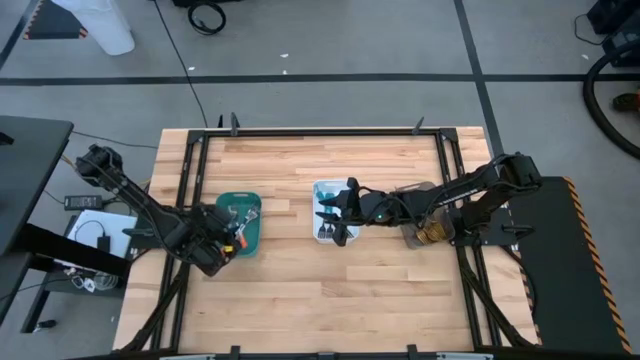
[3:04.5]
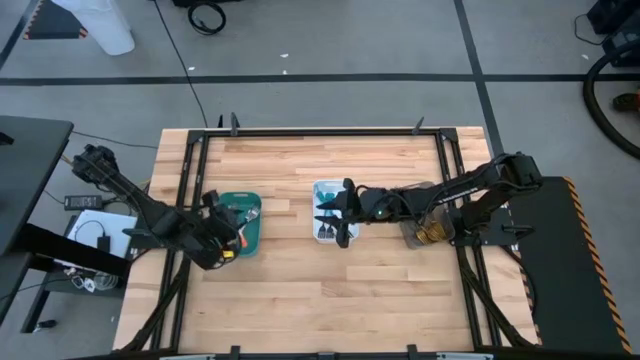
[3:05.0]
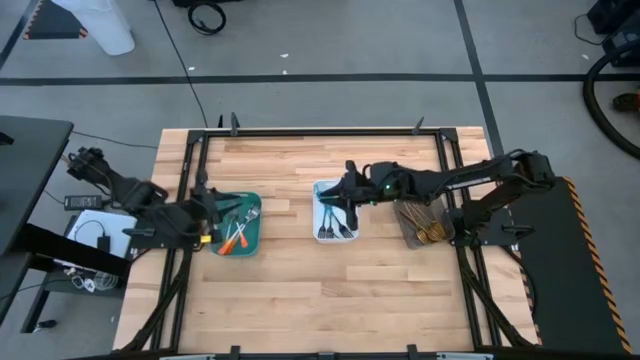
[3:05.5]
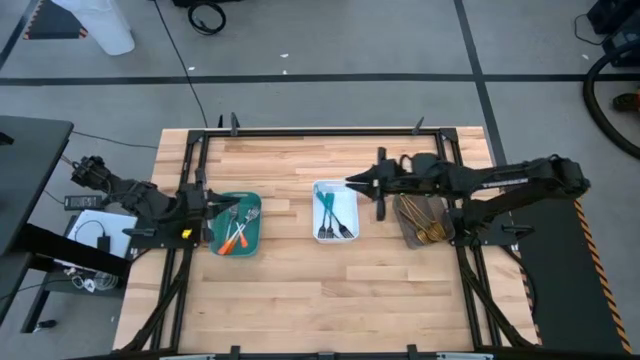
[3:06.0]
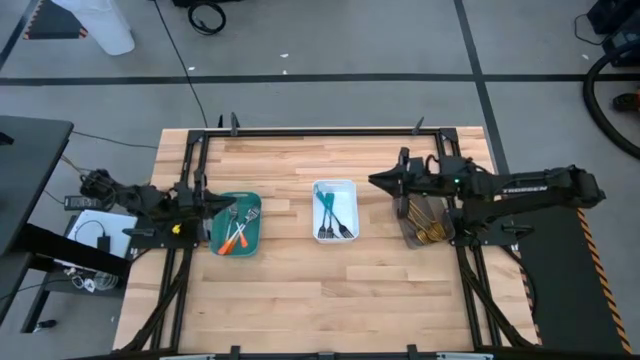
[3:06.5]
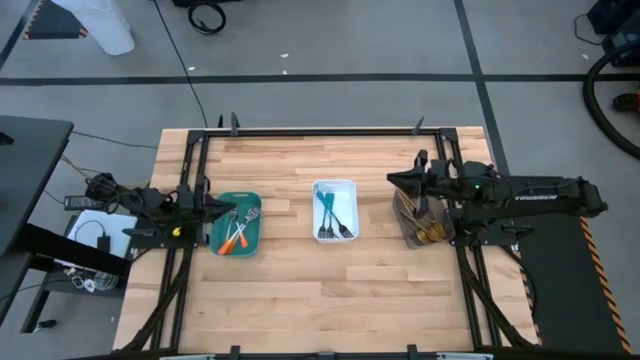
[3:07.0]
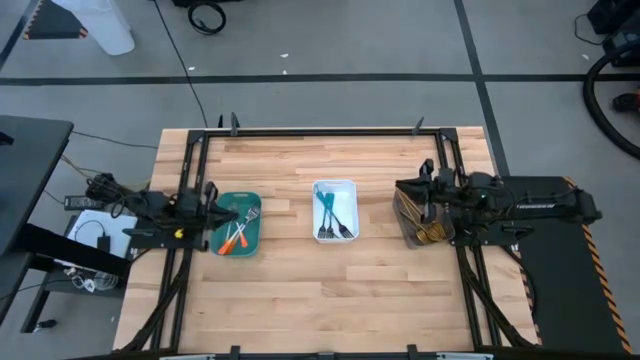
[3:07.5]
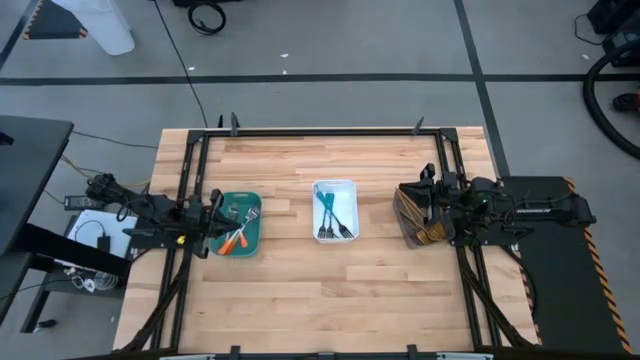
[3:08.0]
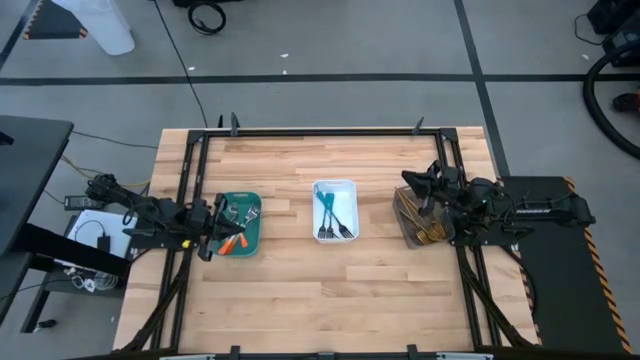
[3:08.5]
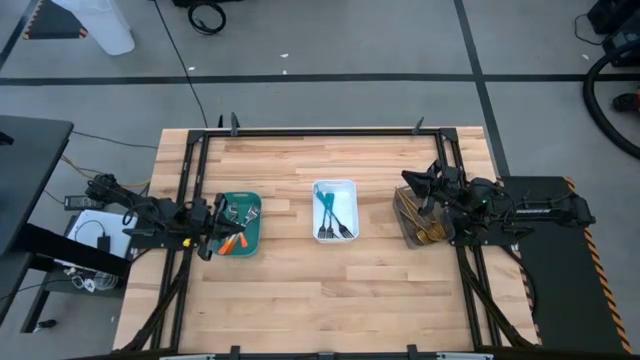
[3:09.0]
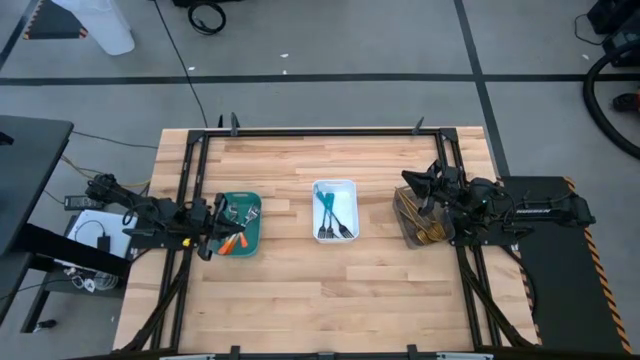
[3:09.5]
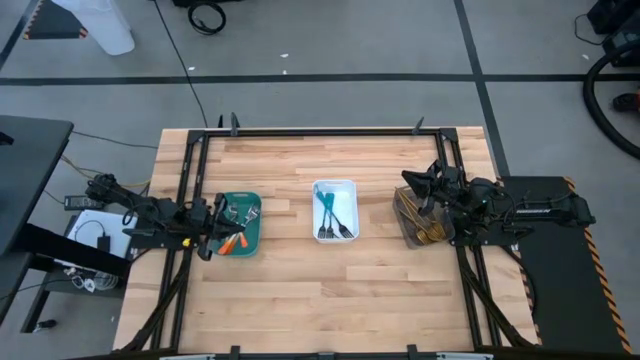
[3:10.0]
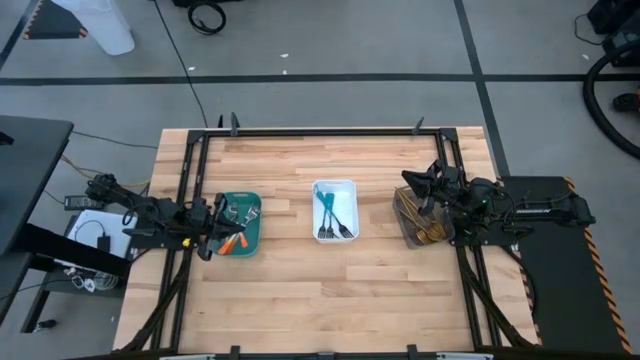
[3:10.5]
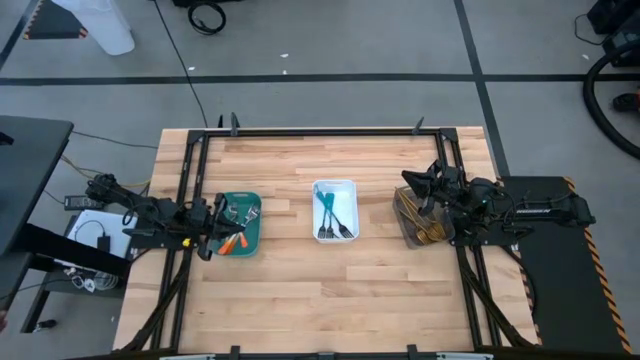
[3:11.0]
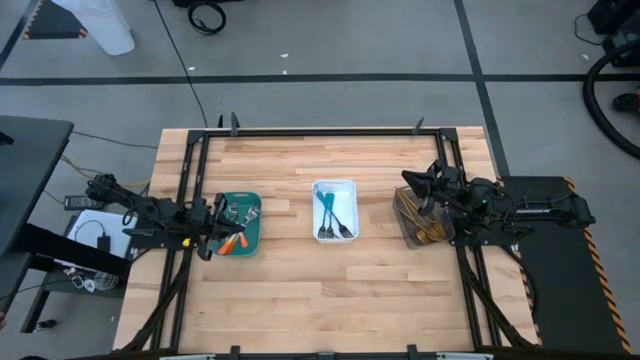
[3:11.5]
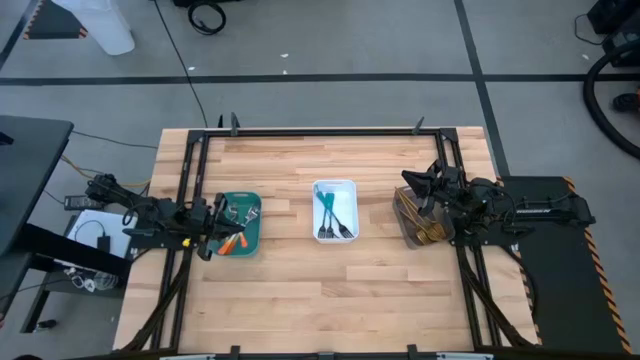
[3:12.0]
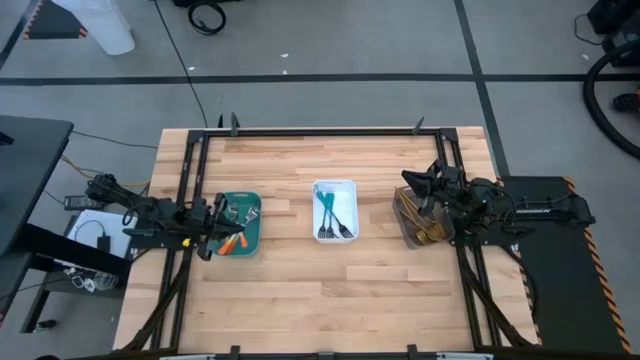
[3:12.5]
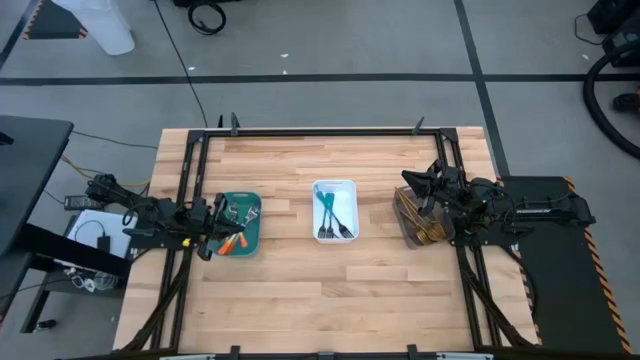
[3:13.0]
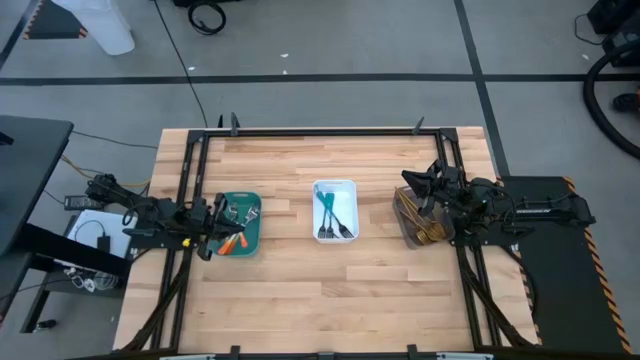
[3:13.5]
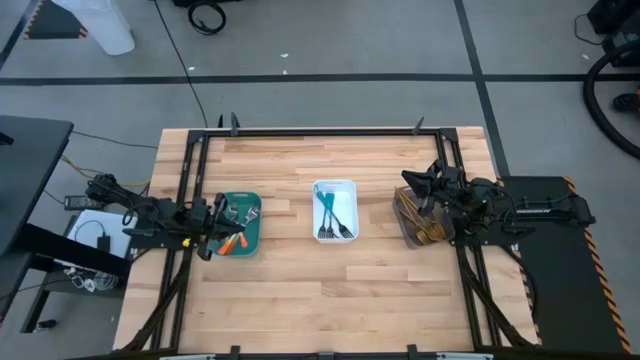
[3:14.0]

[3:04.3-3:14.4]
Task: Sort silverware by color (type)
Return to Home Position

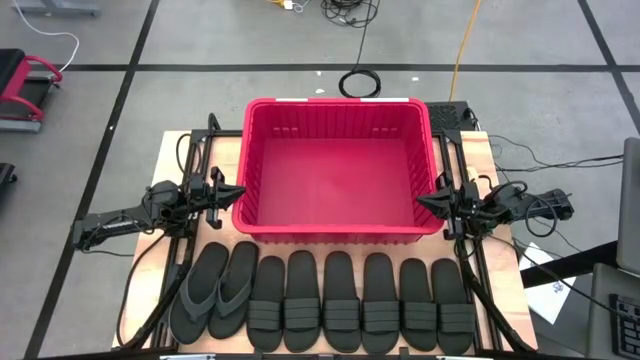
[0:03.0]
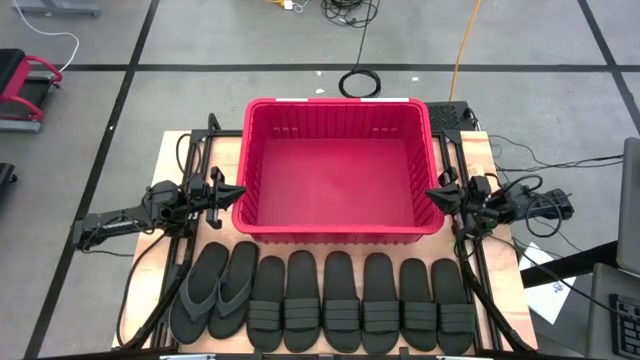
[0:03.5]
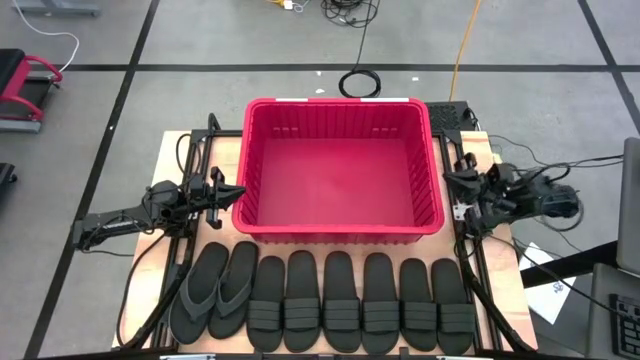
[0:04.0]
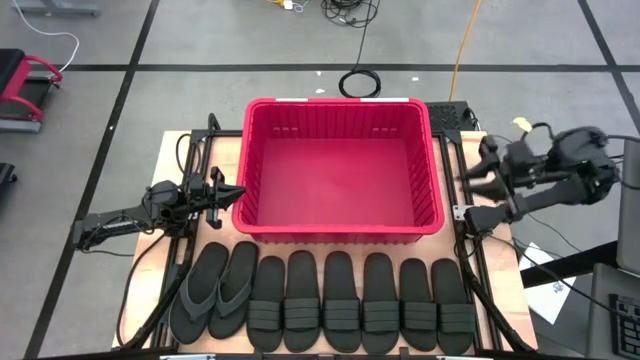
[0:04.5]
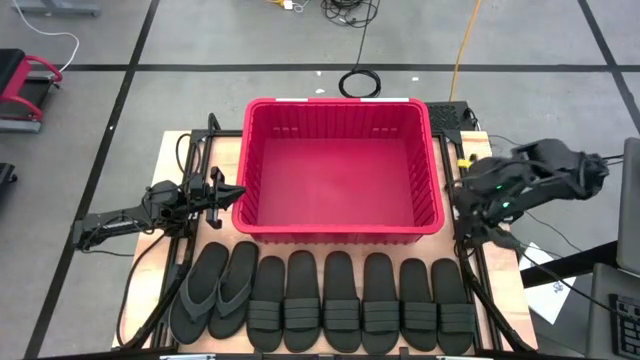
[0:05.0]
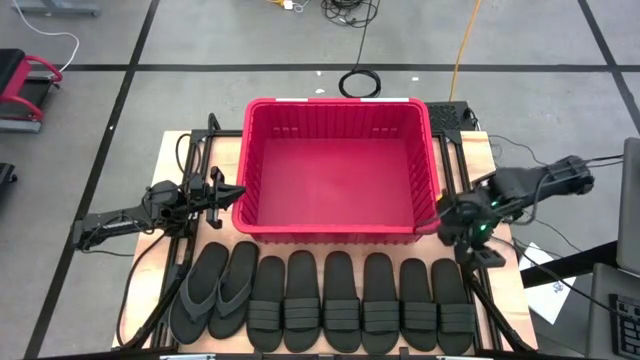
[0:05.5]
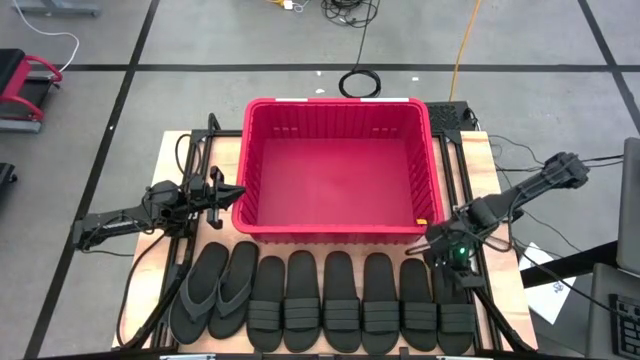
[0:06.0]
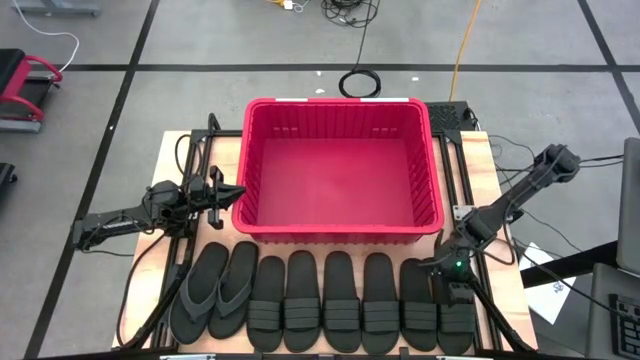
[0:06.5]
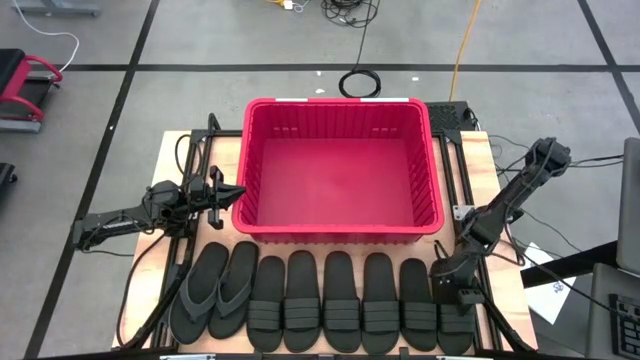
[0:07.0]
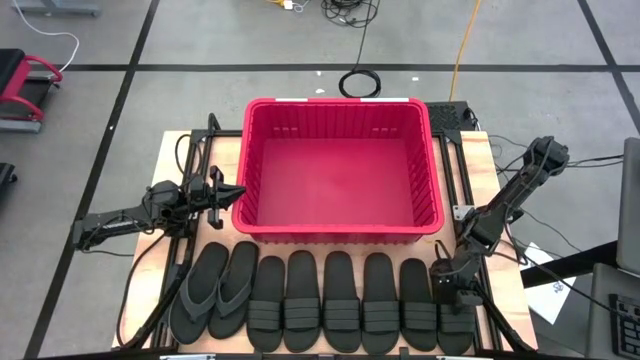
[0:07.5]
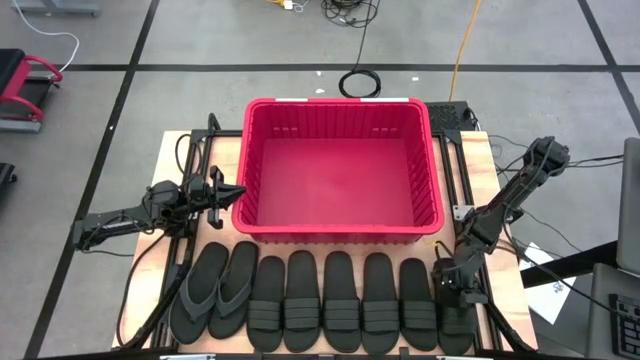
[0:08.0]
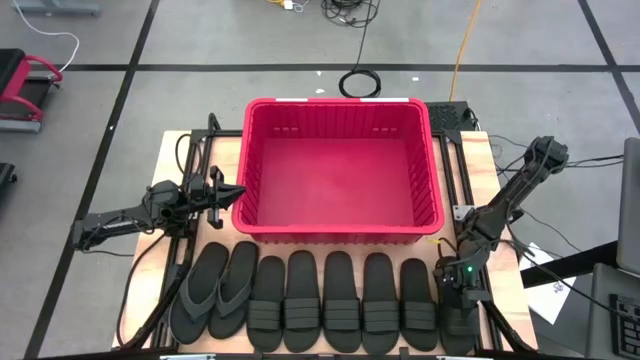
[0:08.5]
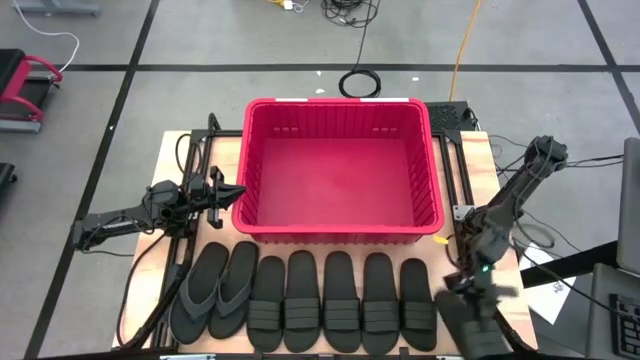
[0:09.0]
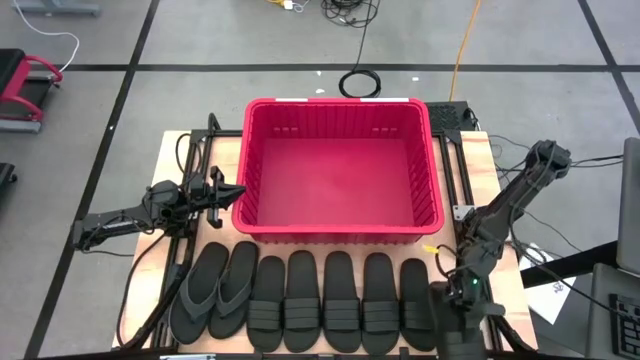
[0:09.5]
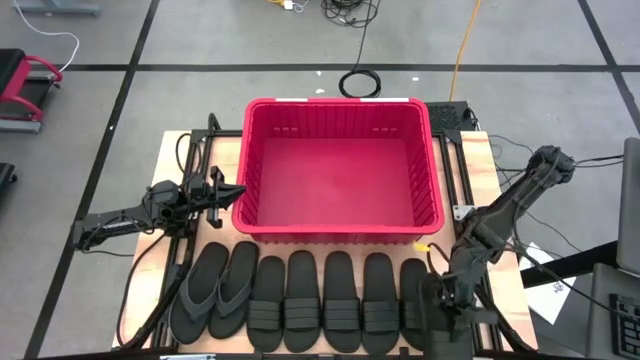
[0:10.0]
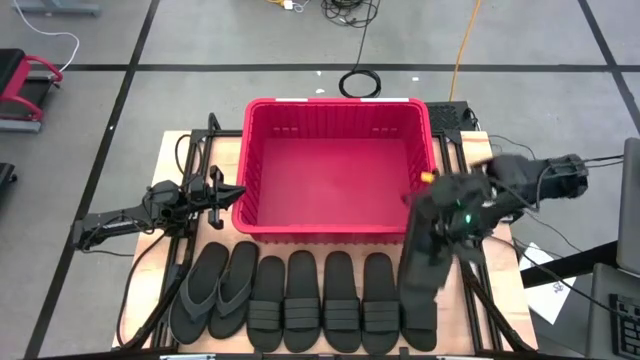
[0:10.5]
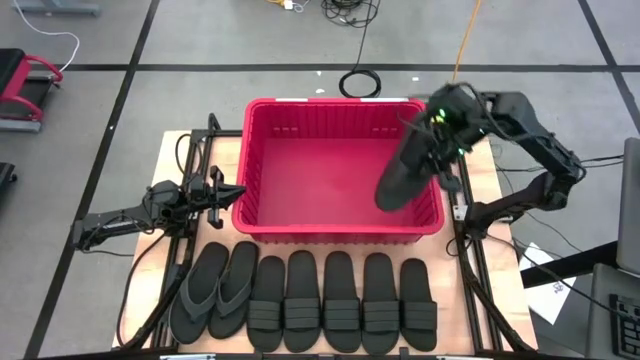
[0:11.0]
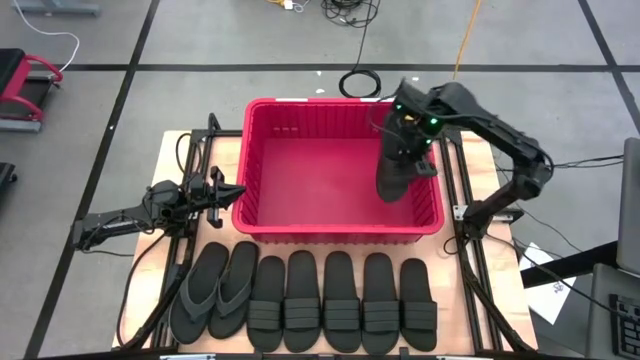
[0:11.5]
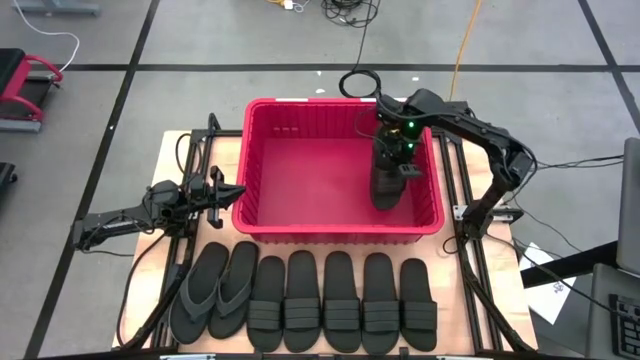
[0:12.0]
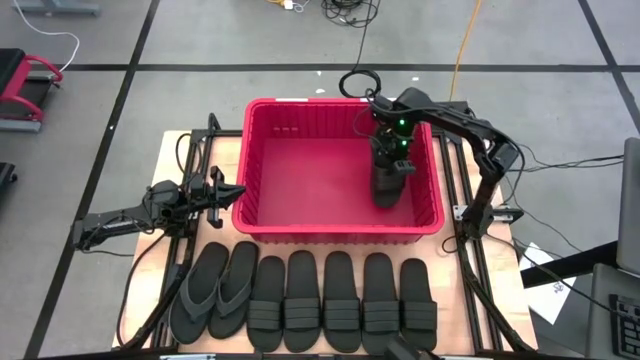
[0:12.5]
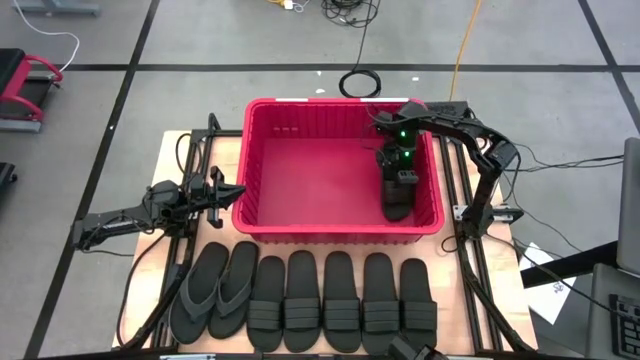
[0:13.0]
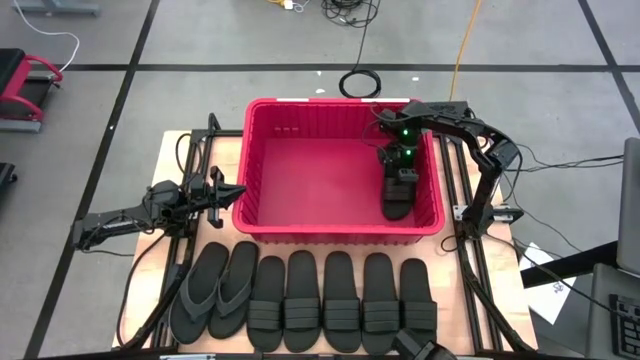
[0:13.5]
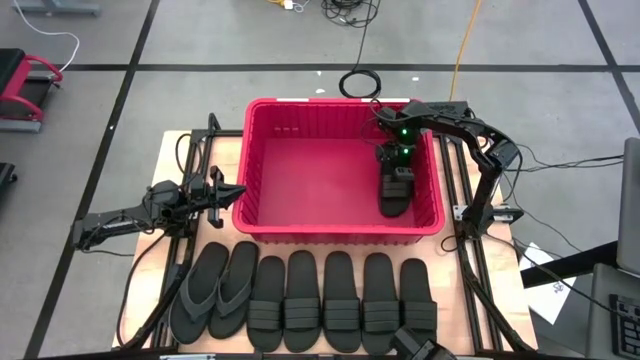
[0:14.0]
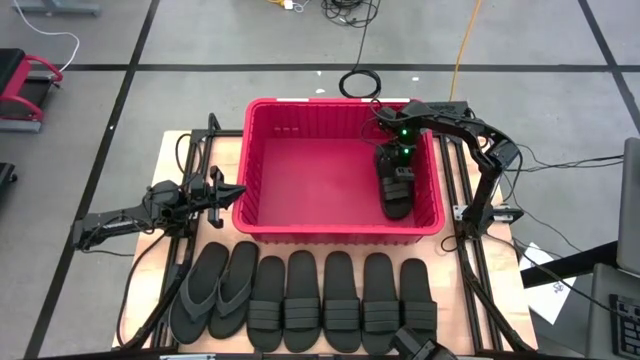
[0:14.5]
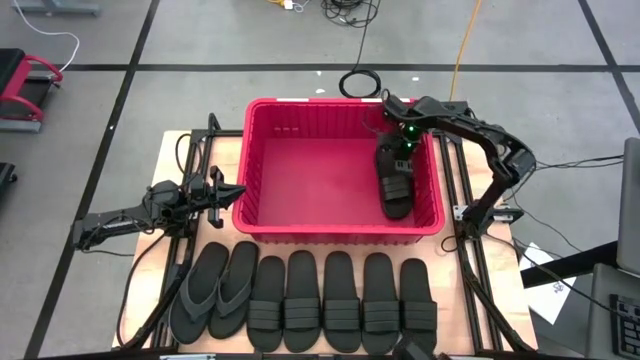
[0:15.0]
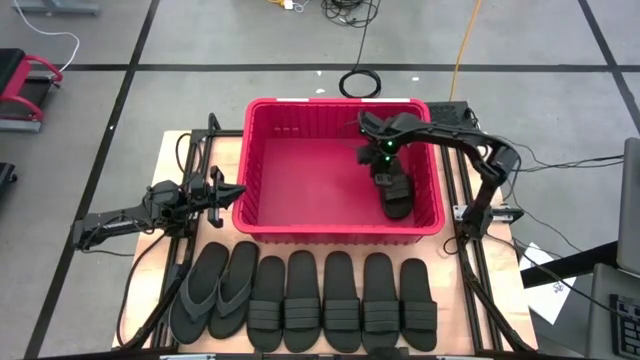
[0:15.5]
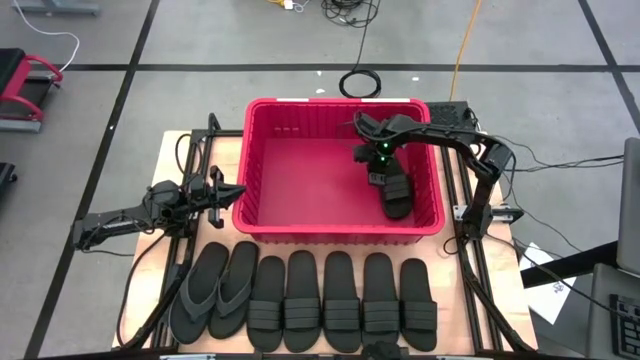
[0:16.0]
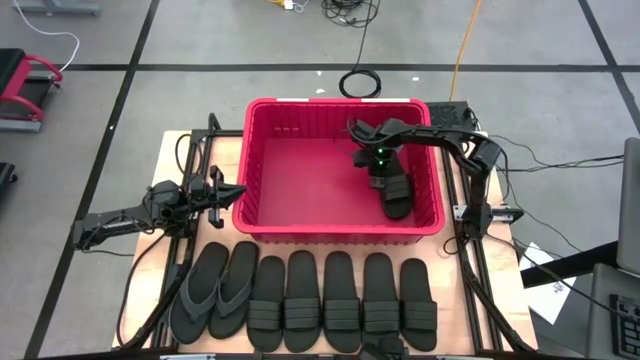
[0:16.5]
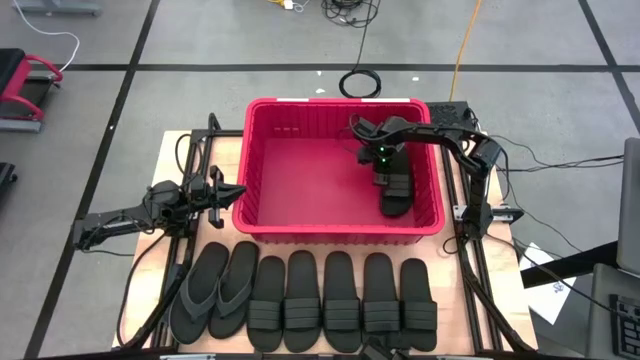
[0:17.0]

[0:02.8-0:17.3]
Task: Pick and place slides into bin
Put the black slide into the red bin
